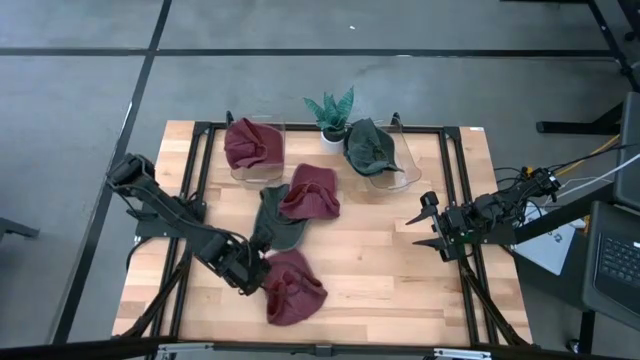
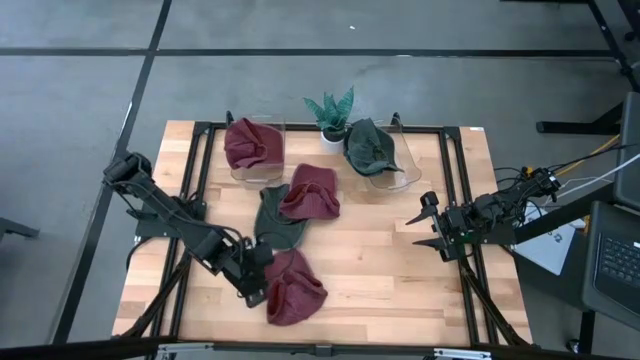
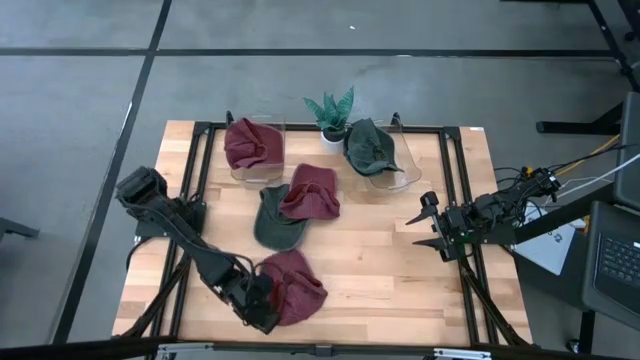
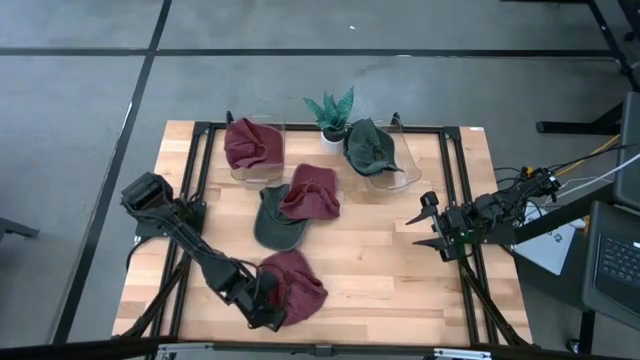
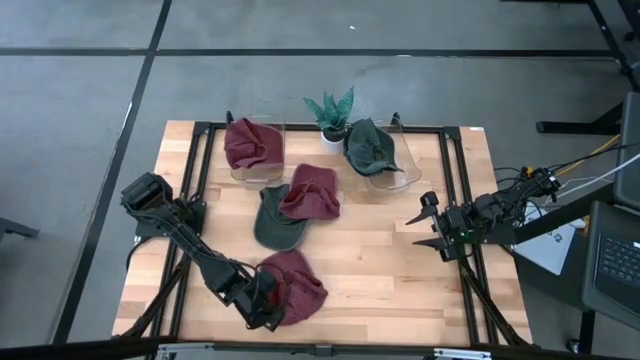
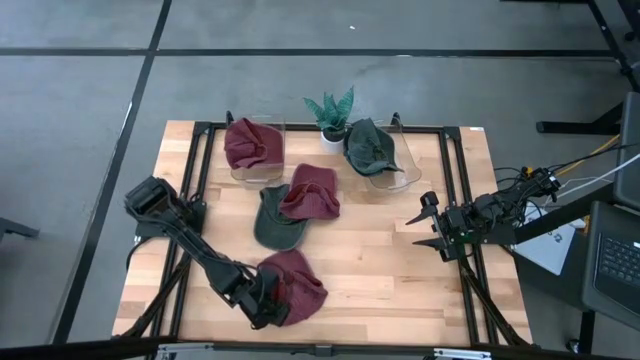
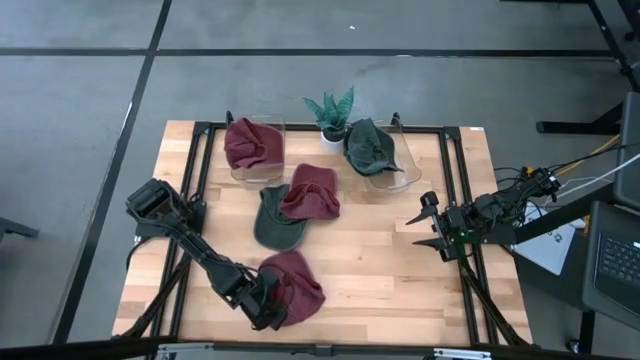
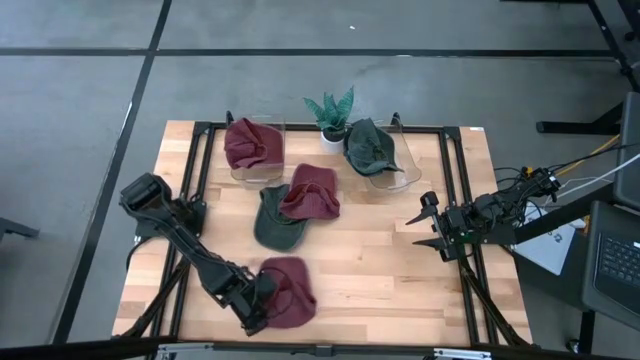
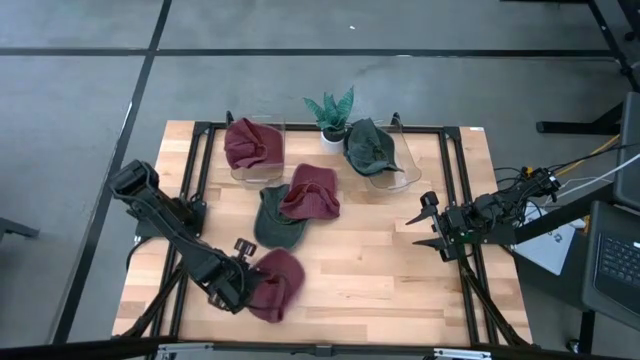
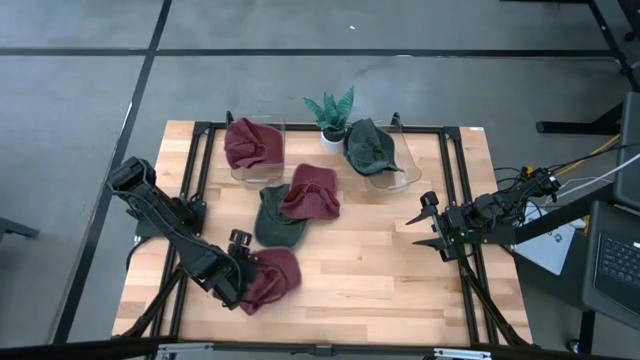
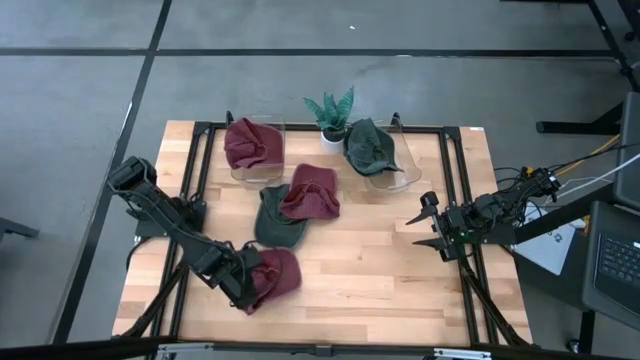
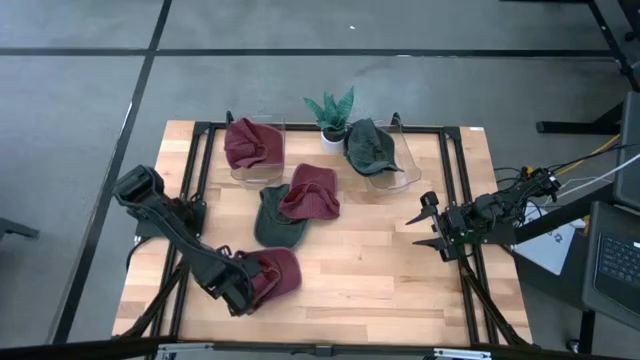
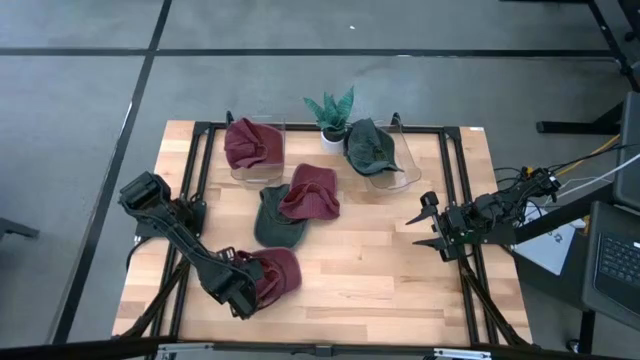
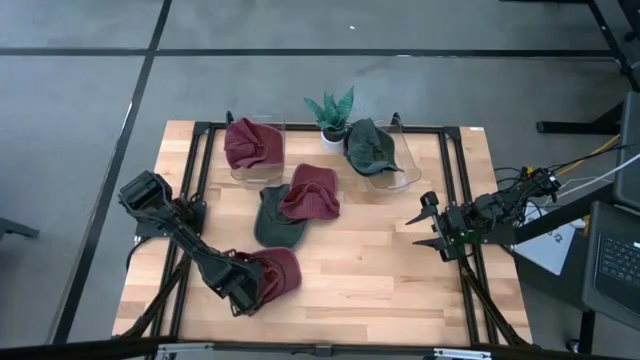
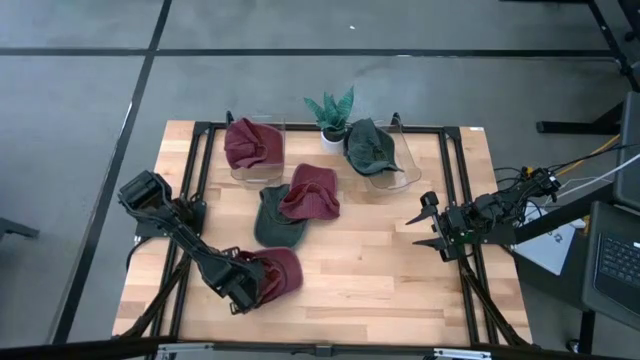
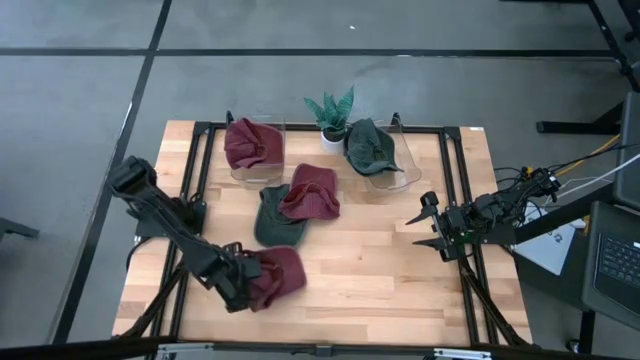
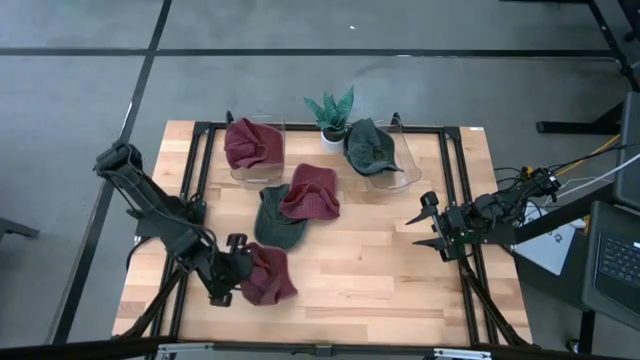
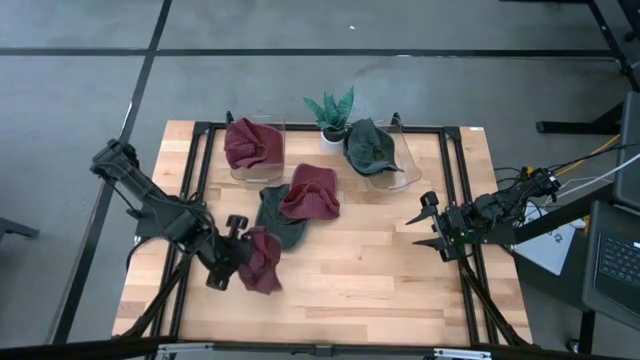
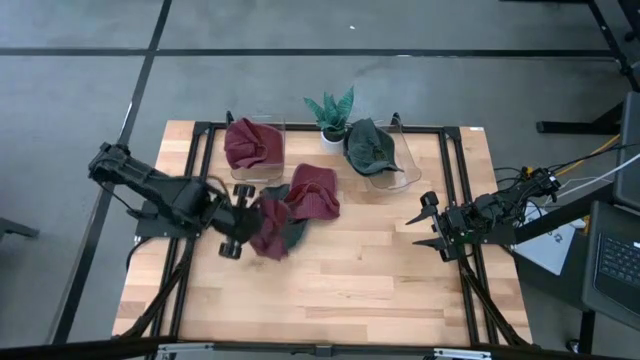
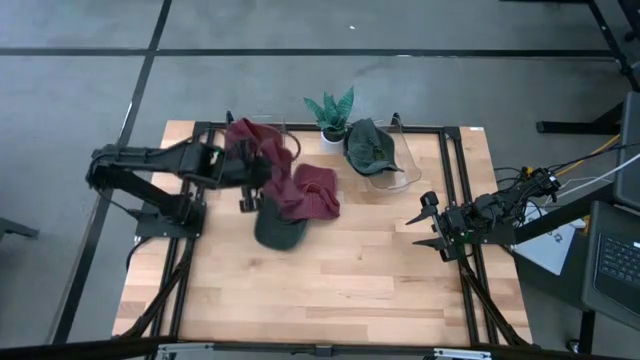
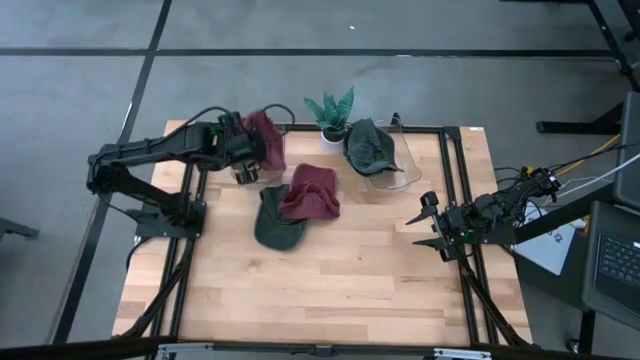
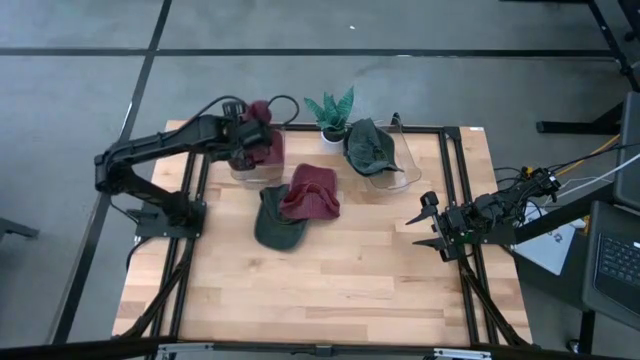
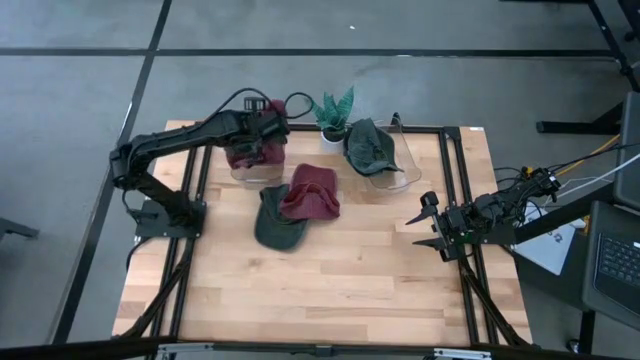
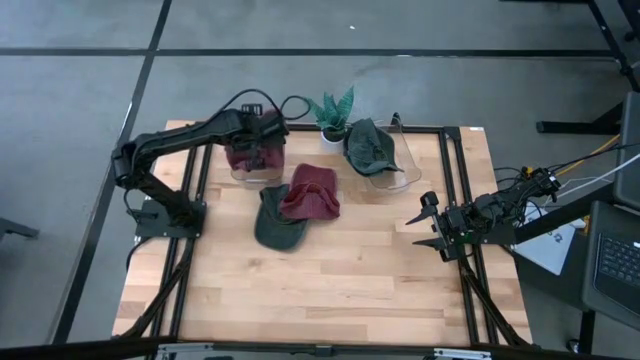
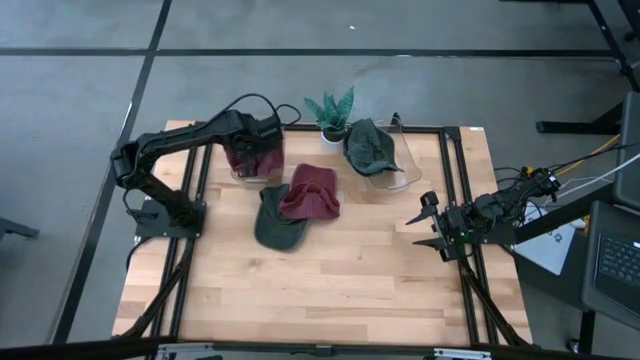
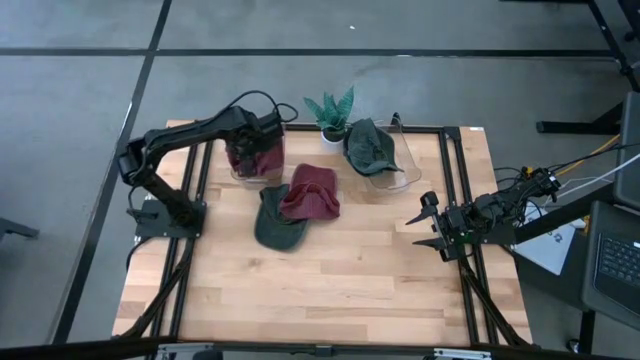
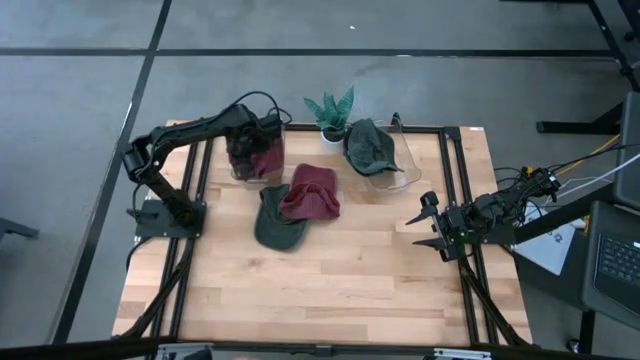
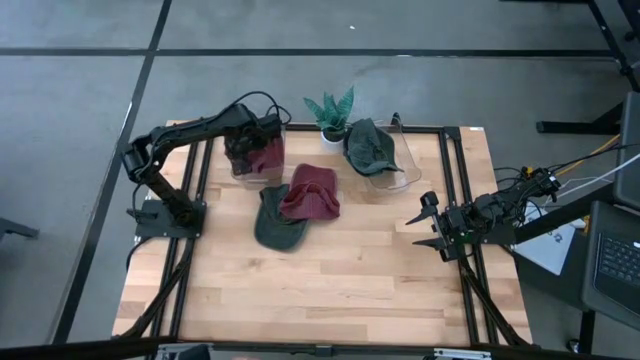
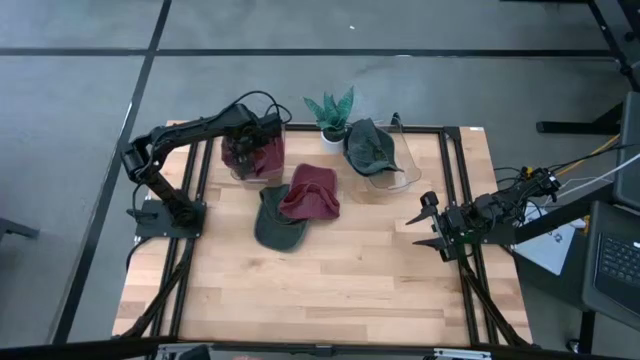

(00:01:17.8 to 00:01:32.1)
Task: Pick & Place hat
Put the bottom red cap into the left bin
